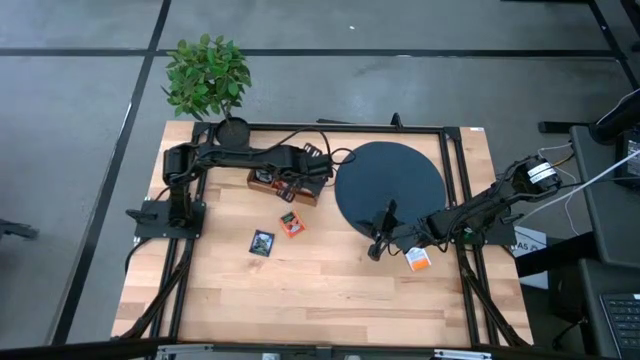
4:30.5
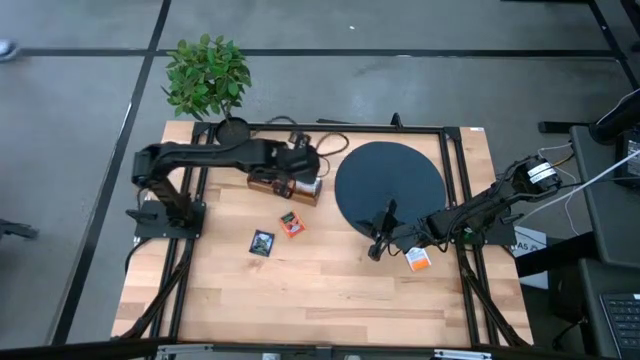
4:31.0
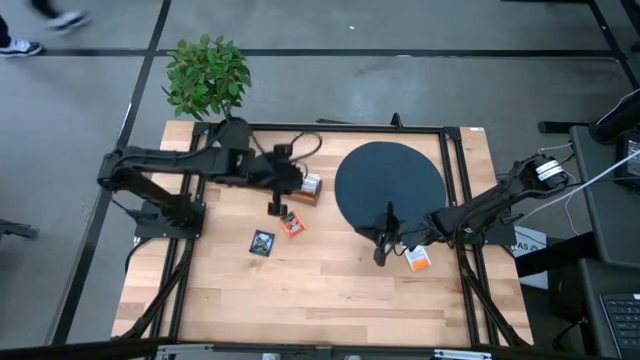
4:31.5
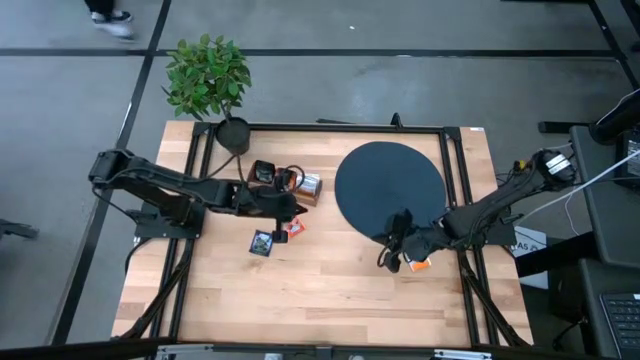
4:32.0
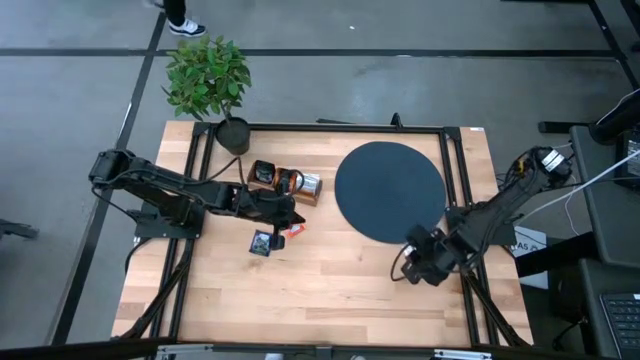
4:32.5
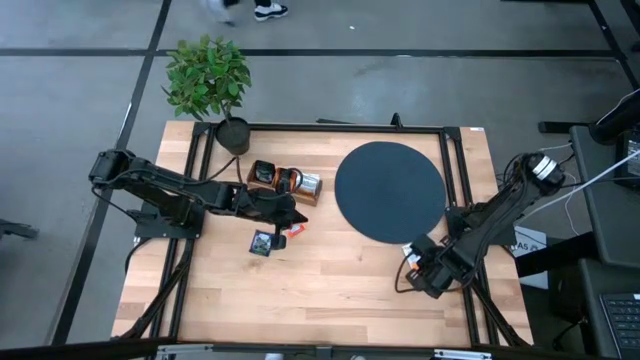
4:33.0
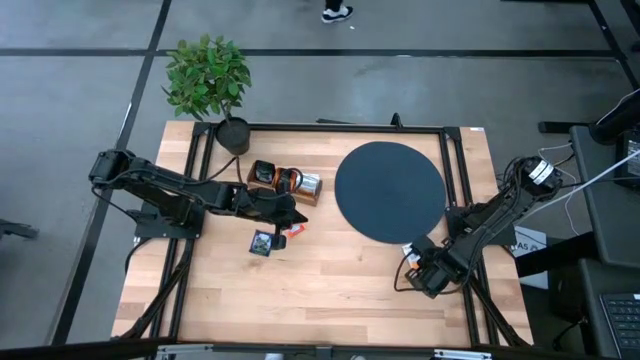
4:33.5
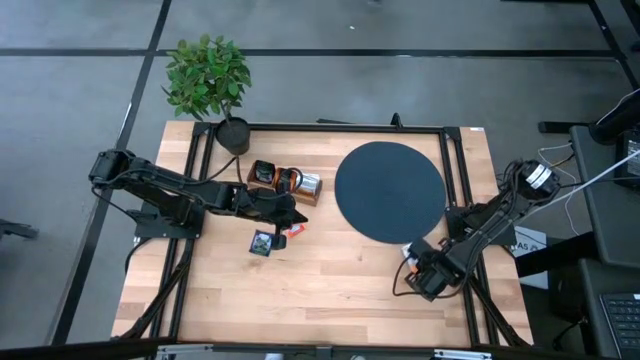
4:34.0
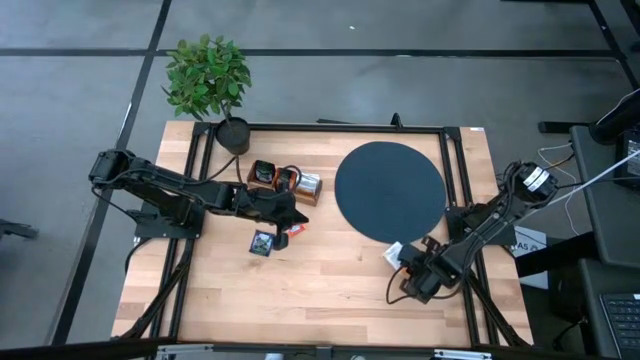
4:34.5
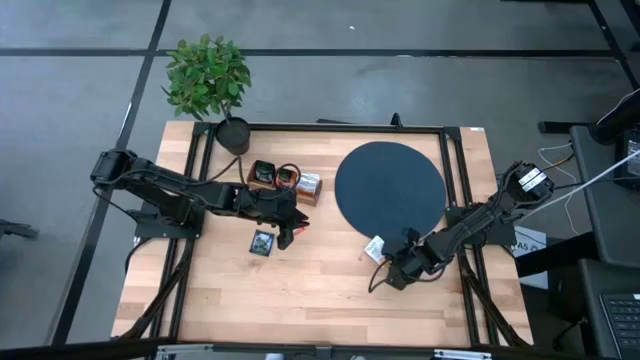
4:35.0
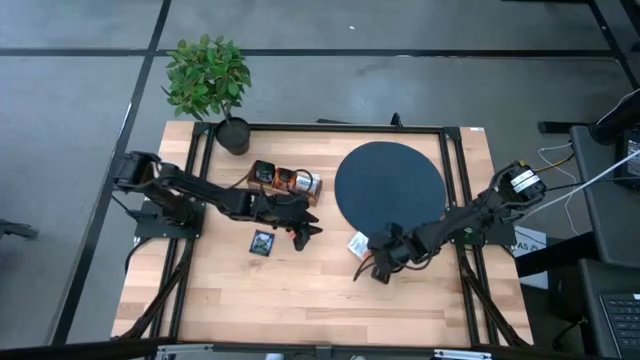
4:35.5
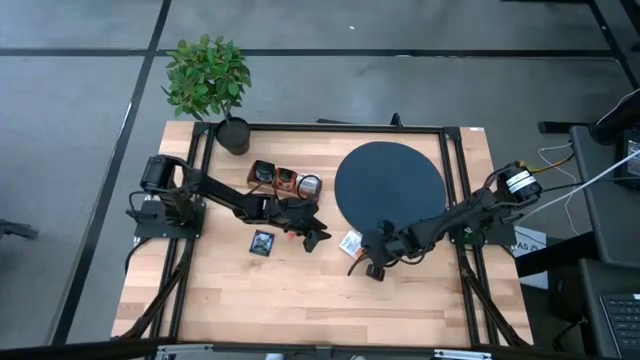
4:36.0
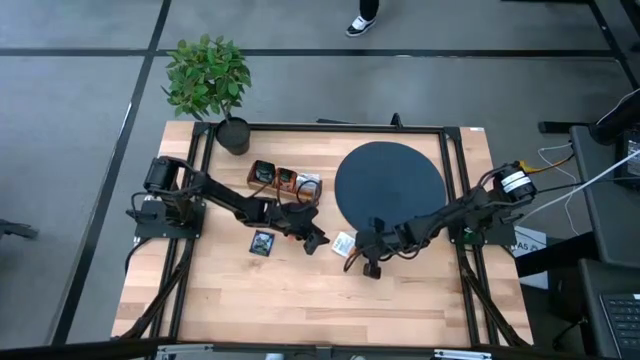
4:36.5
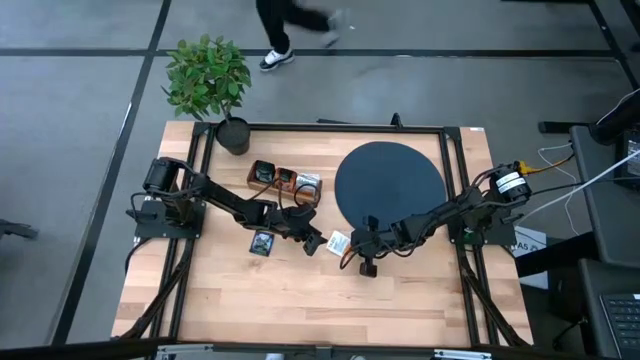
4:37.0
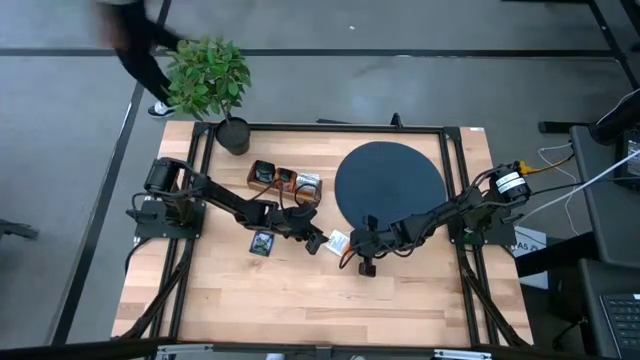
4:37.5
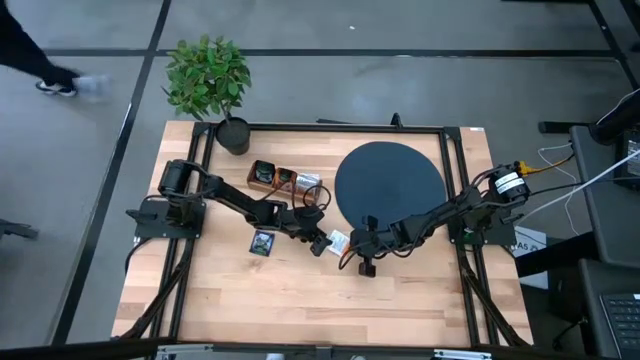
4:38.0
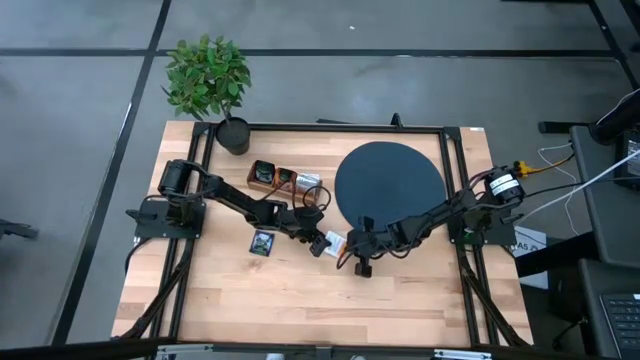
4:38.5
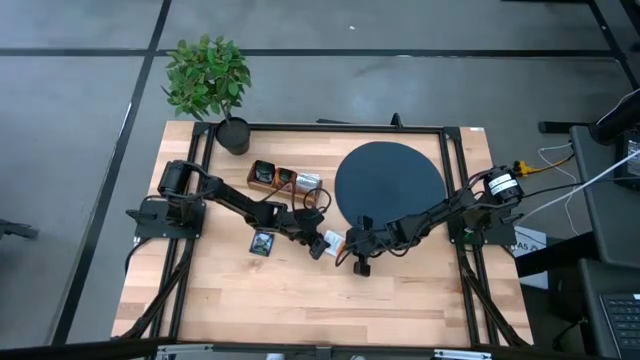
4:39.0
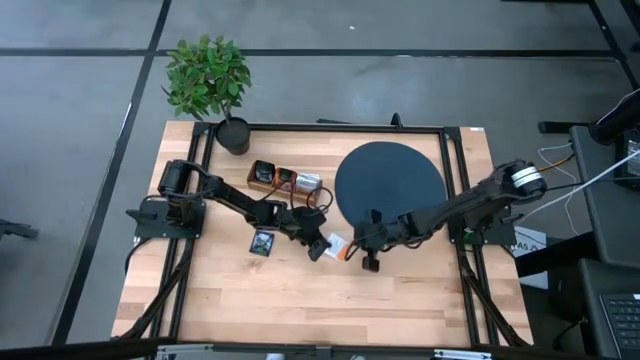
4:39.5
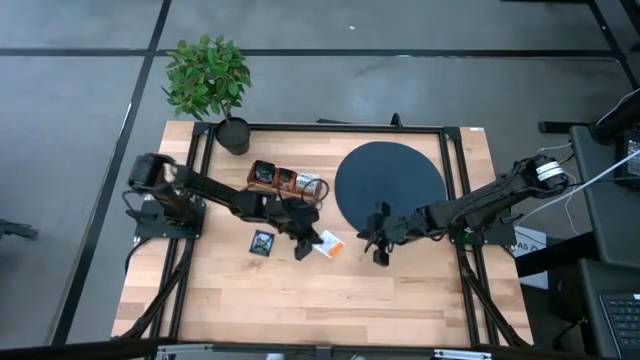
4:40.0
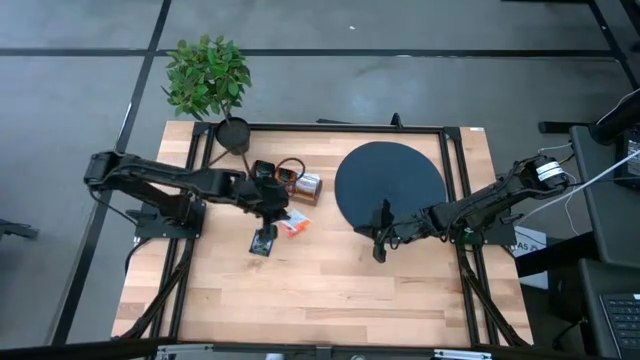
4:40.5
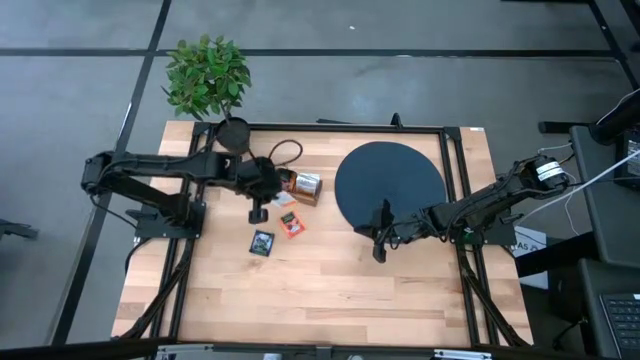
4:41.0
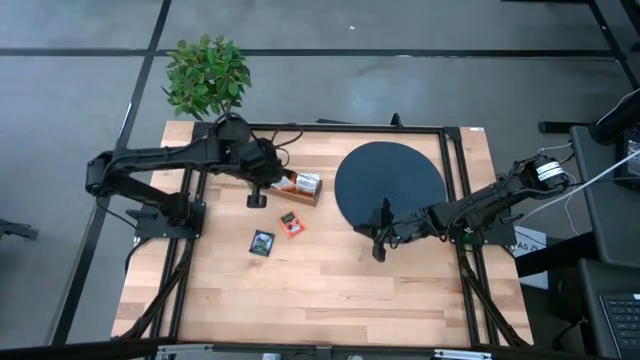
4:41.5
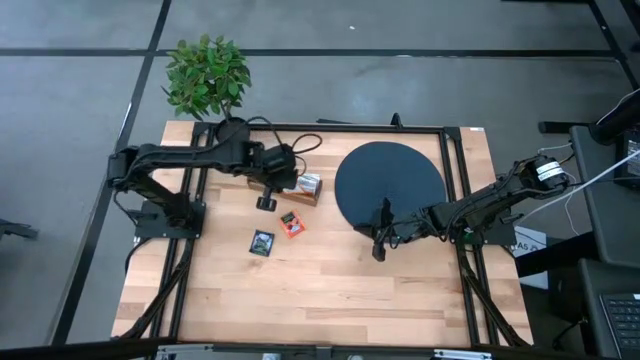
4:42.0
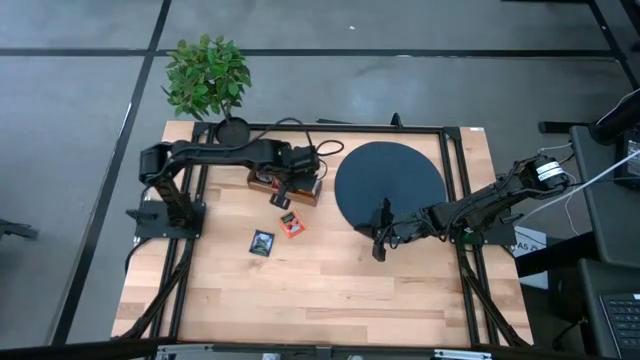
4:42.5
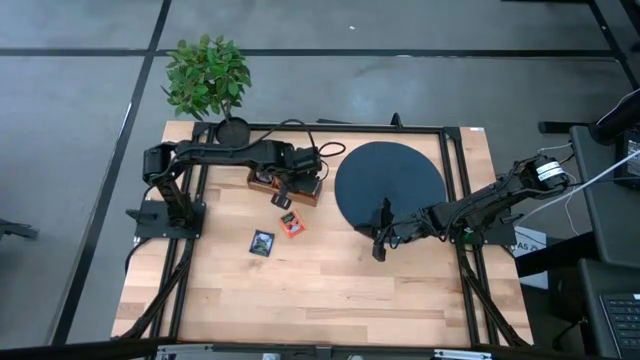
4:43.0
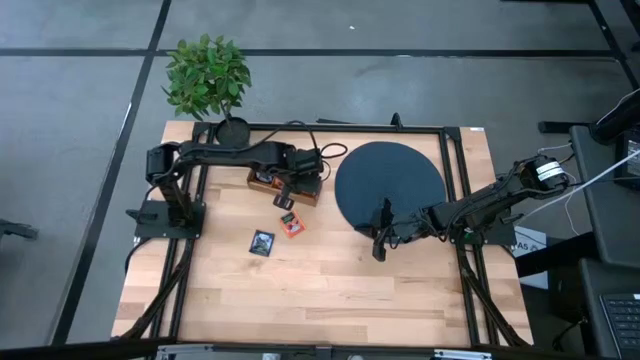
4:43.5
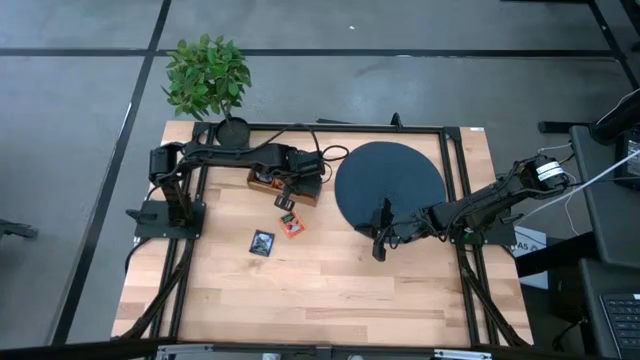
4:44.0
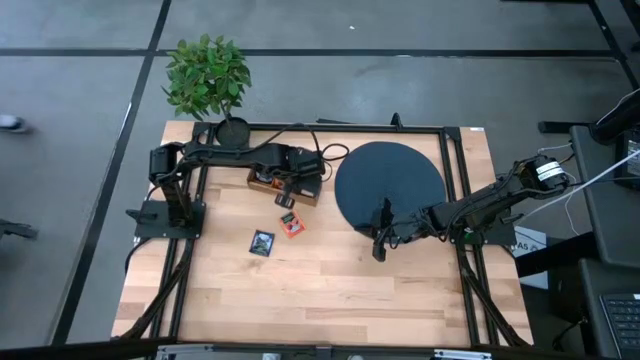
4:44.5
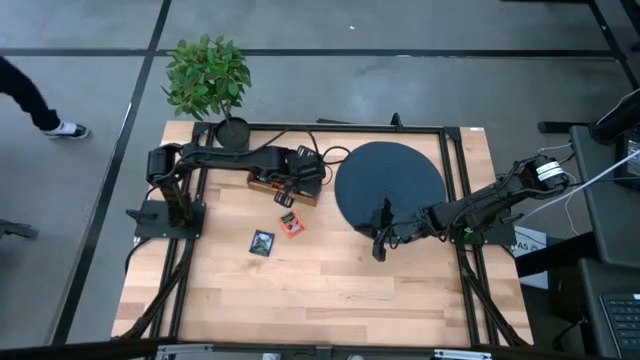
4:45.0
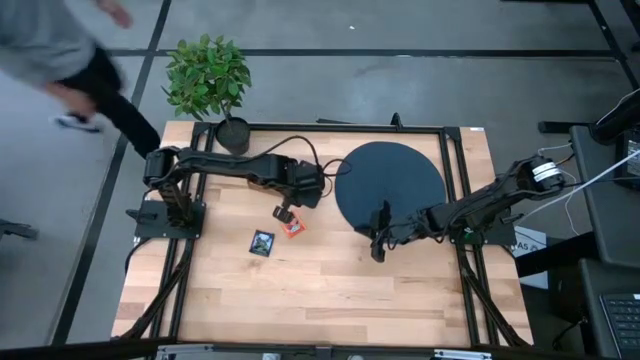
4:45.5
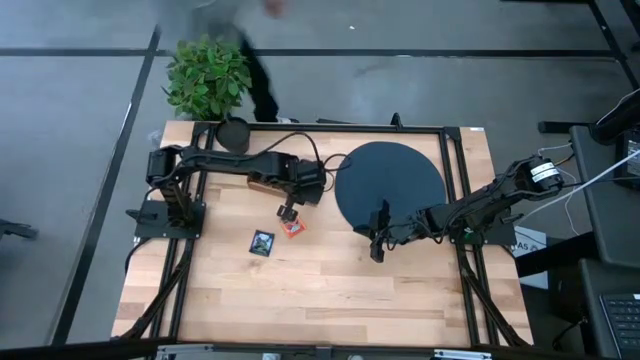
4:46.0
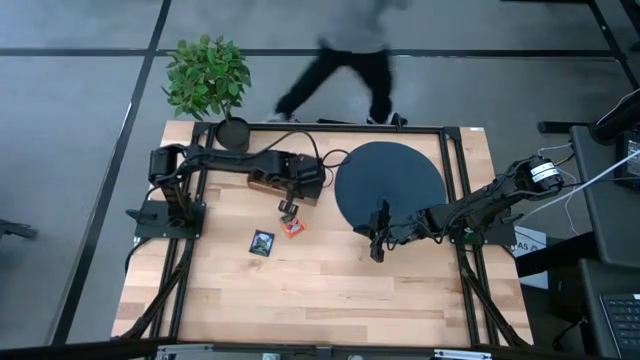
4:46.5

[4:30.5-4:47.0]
Task: Pick & Place Tea
Put the white tea bag into the right section of the wooden organizer

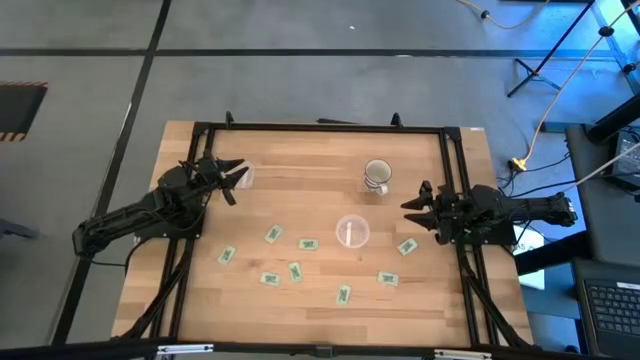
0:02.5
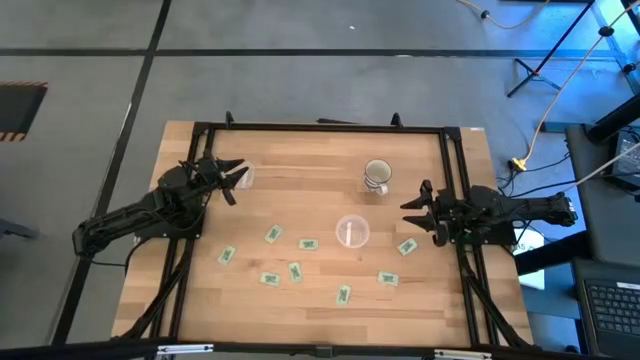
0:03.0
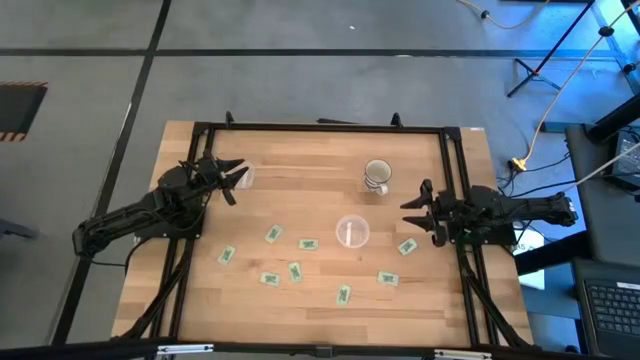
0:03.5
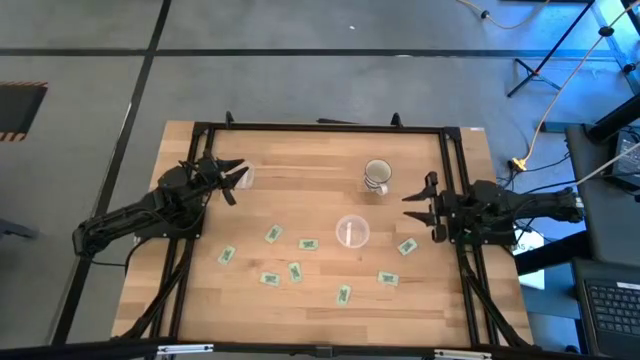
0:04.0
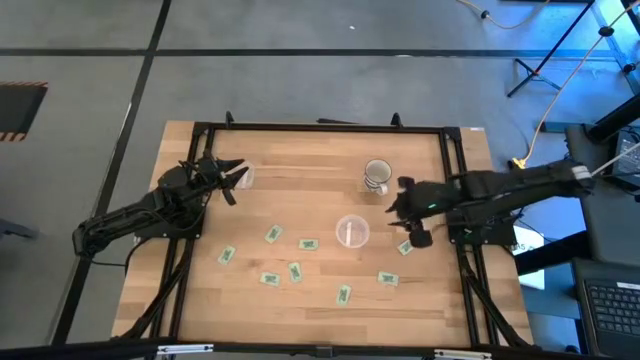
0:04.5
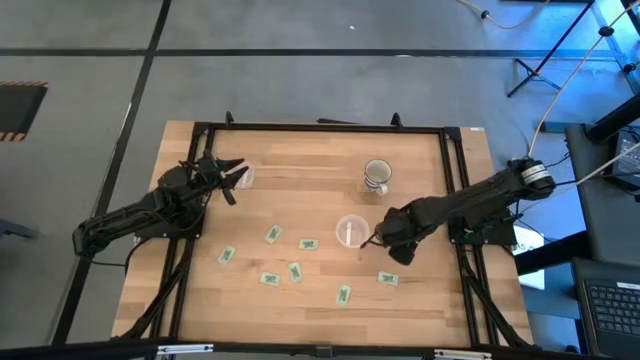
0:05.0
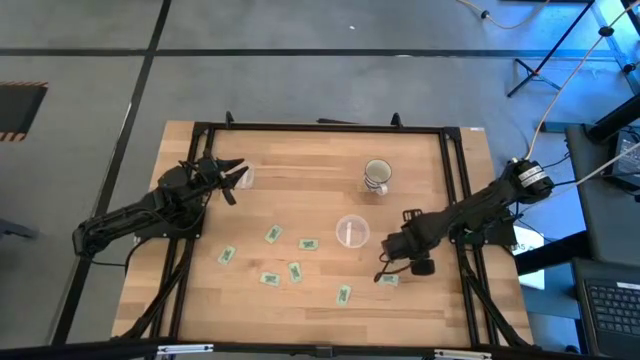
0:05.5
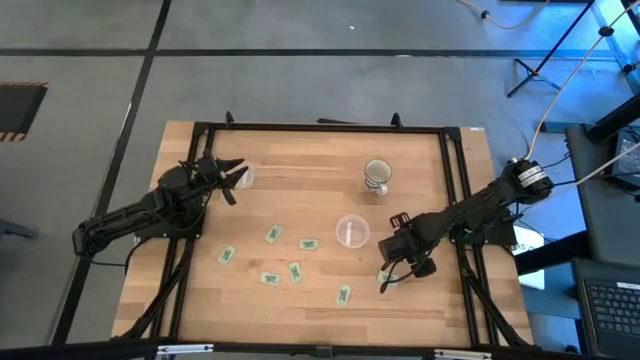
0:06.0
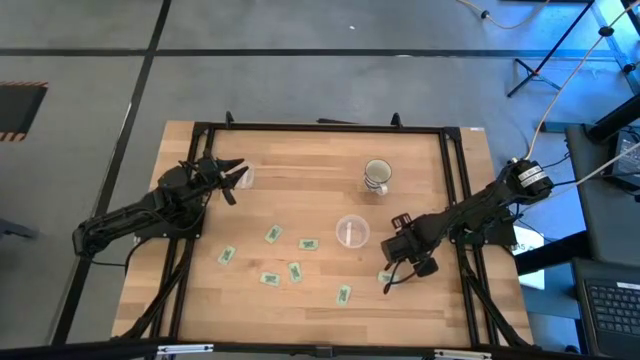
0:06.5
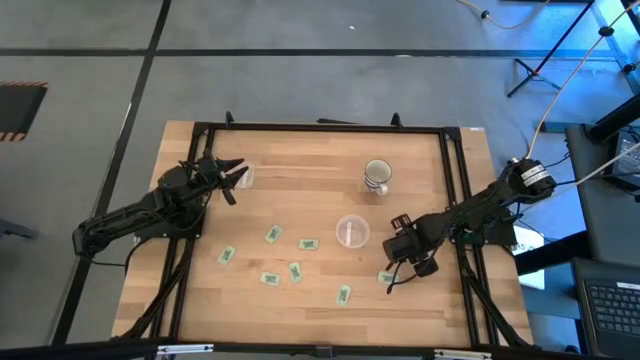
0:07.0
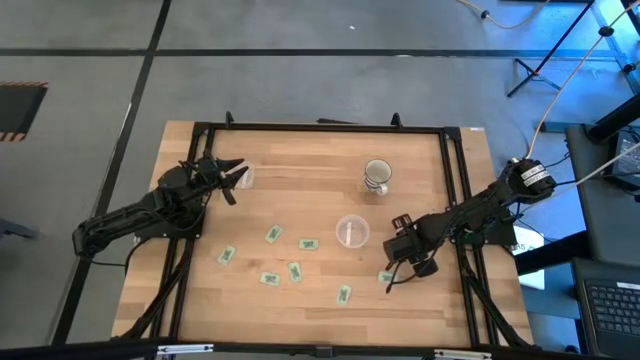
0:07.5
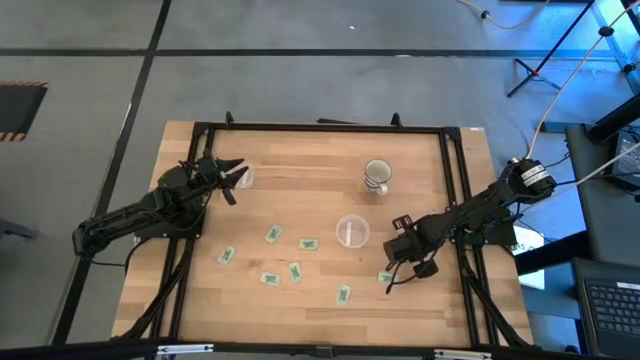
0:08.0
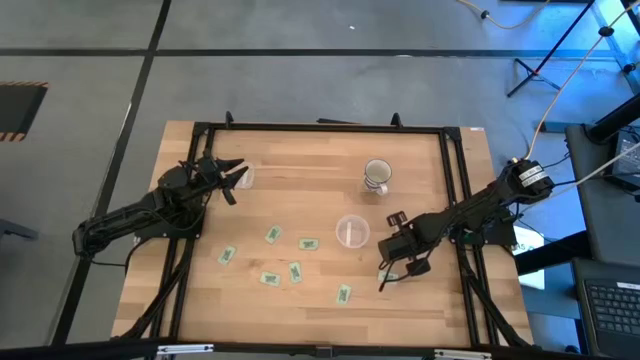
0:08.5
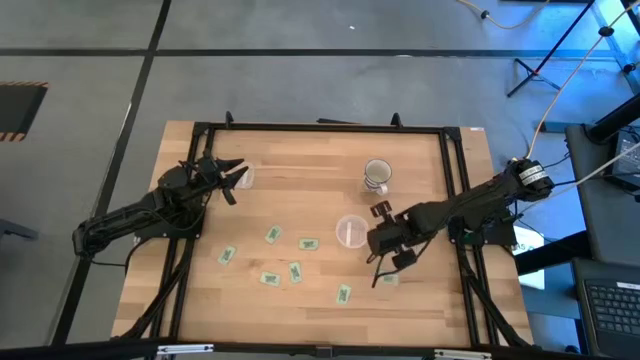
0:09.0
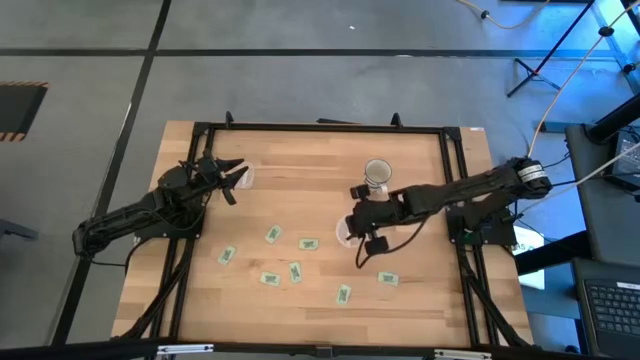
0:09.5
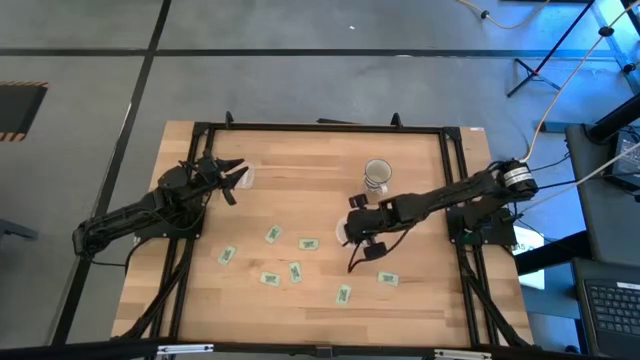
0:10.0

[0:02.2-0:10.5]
Task: Pick and place Stevia / Truvia into bins
Put the green stevia packet into the circular transparent container
